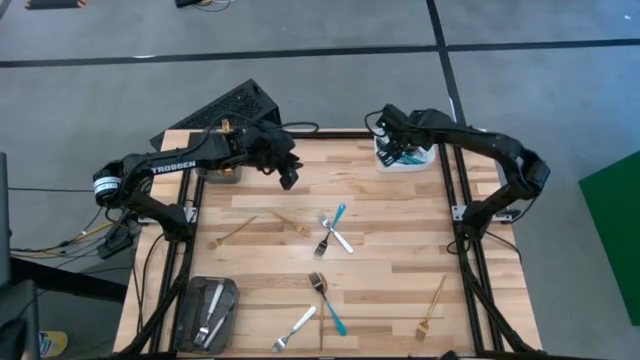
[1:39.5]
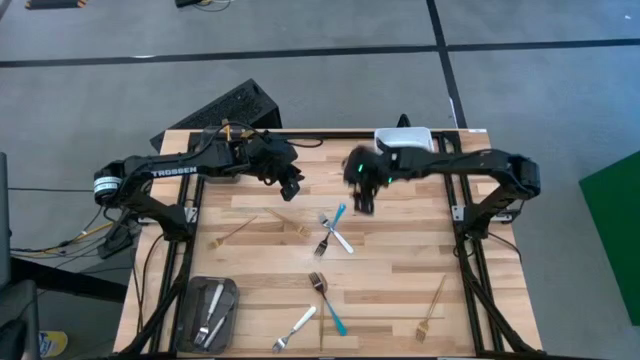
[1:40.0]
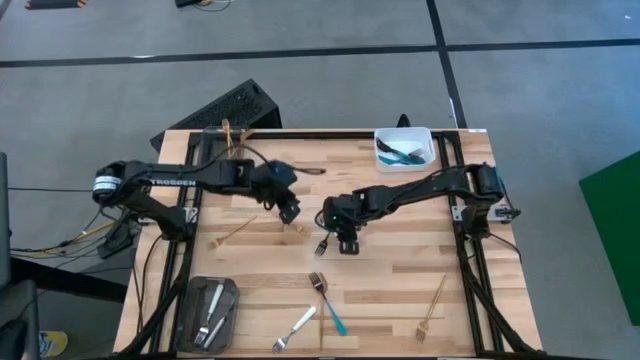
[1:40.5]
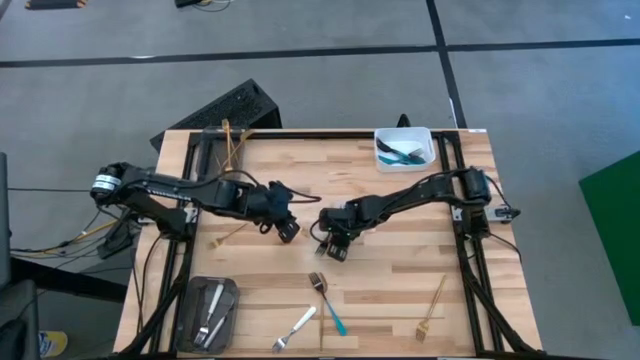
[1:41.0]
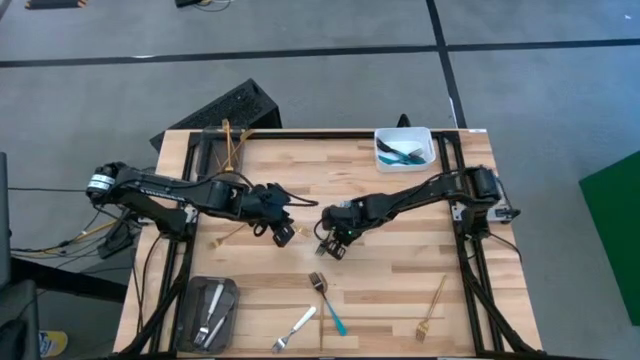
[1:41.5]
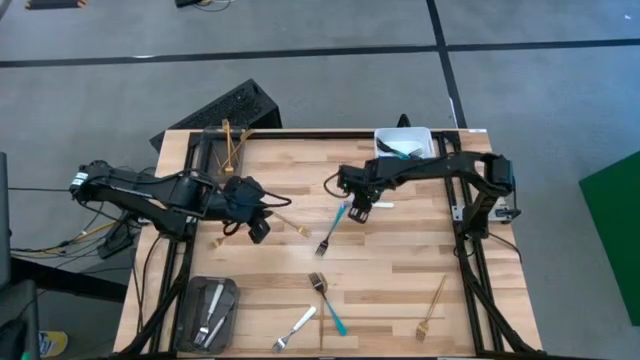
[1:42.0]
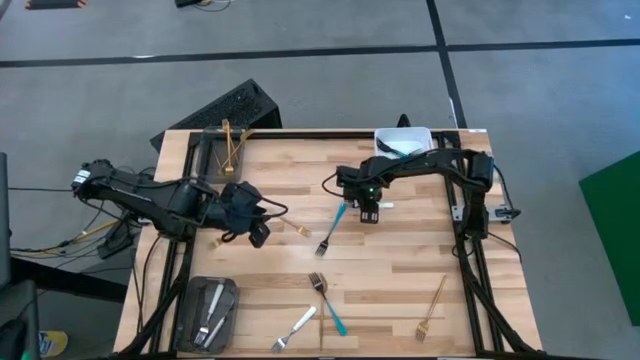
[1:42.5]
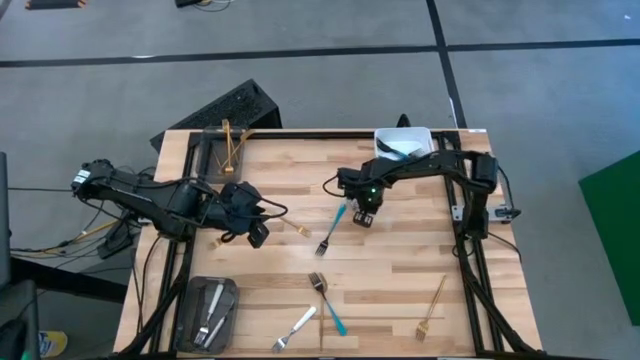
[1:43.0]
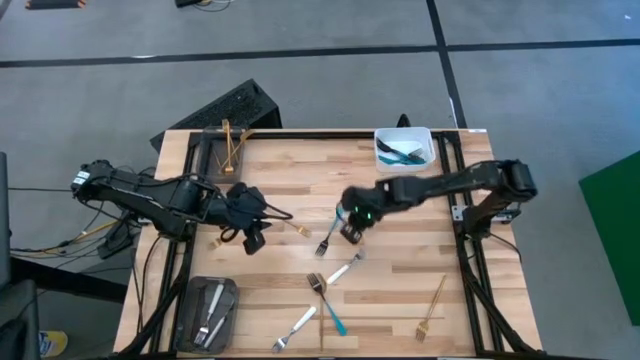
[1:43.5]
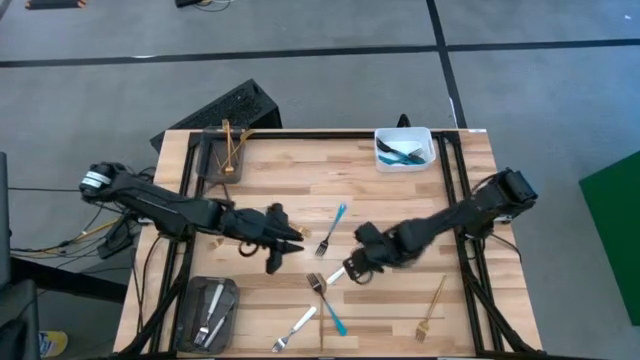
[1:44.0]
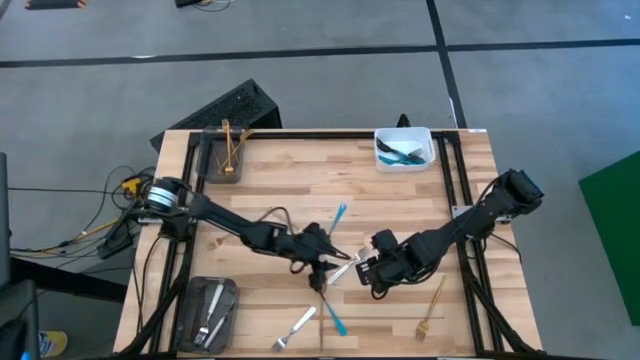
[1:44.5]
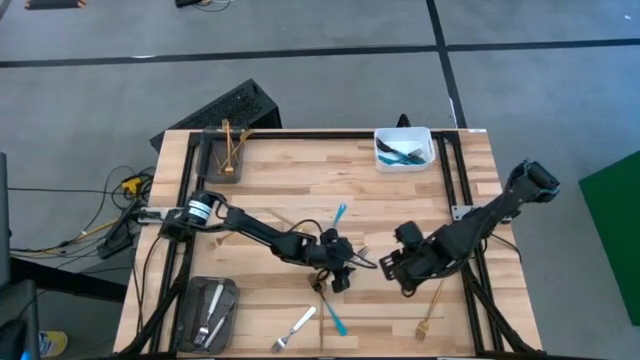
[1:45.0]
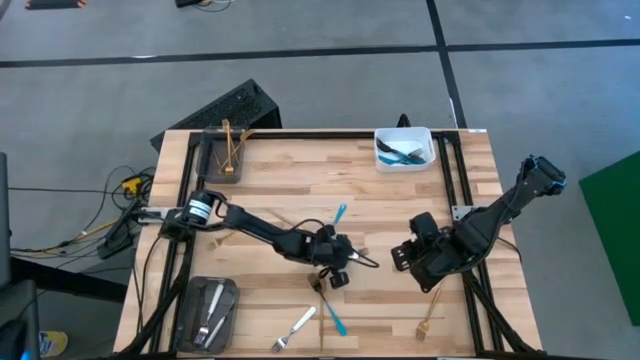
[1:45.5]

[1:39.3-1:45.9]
Task: Sort silverware by color (type)
Put the white fork into the bottom black bin

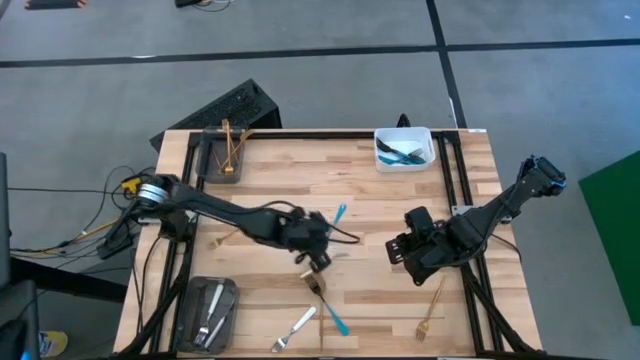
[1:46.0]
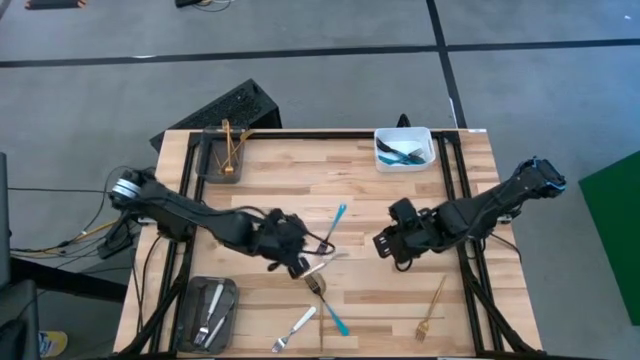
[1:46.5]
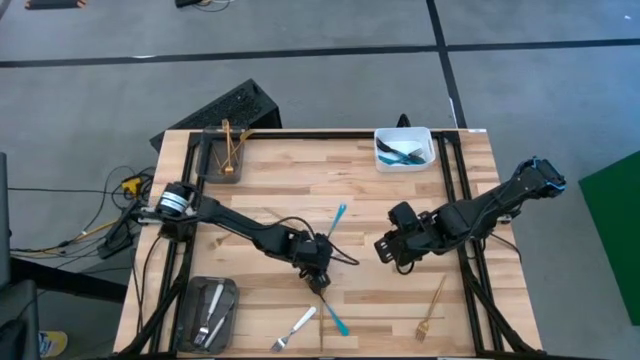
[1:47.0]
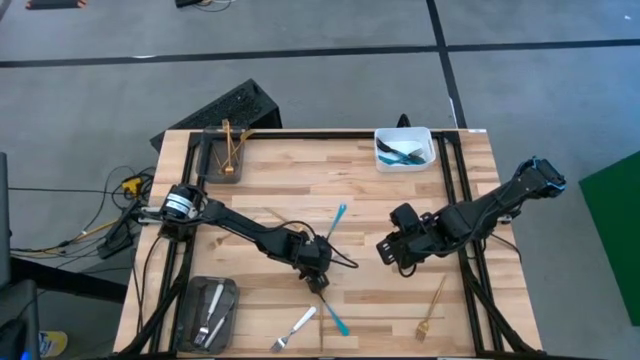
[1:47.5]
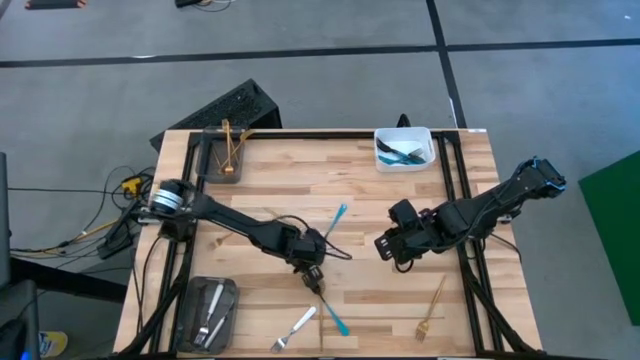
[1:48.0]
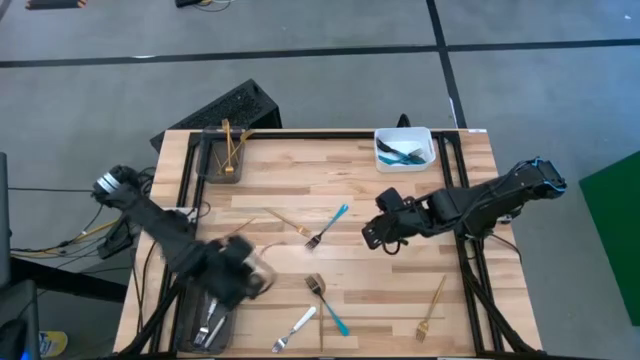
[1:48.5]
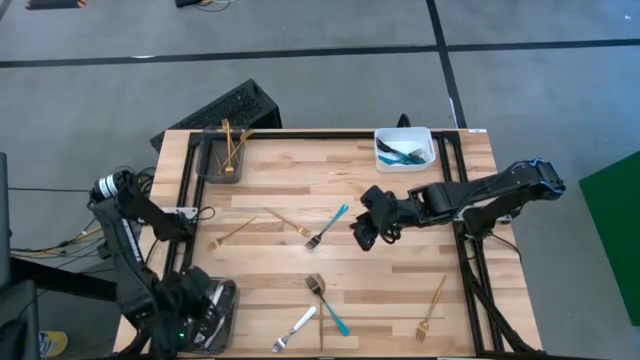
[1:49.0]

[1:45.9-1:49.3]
Put the white fork into the bottom black bin

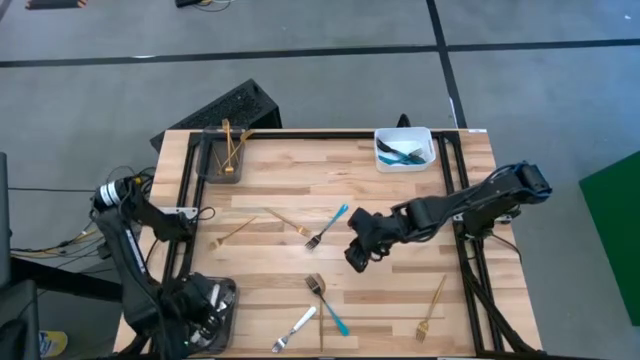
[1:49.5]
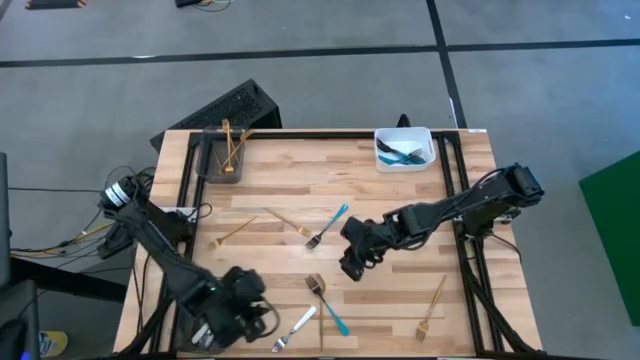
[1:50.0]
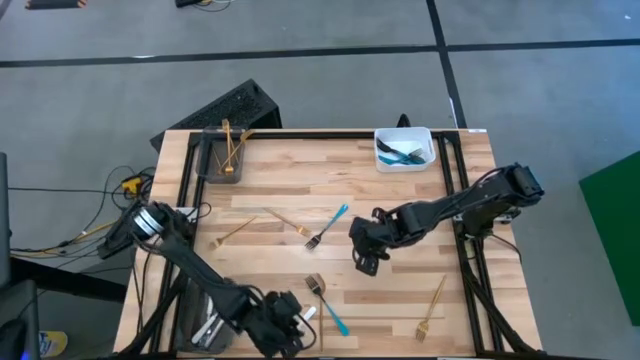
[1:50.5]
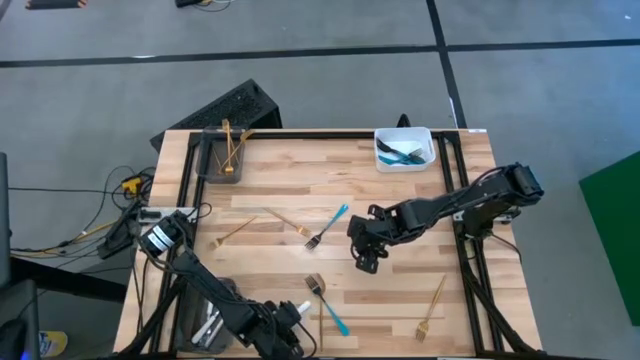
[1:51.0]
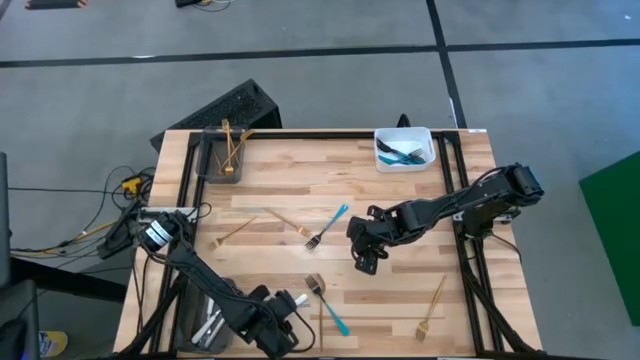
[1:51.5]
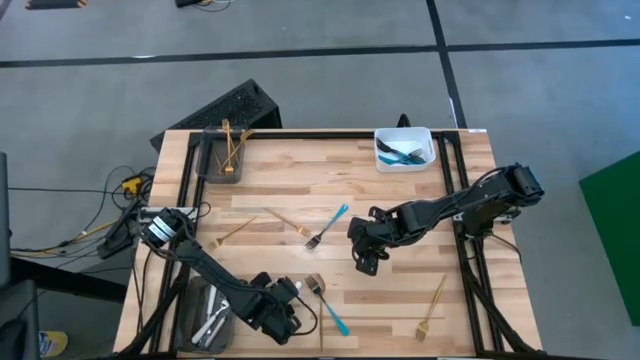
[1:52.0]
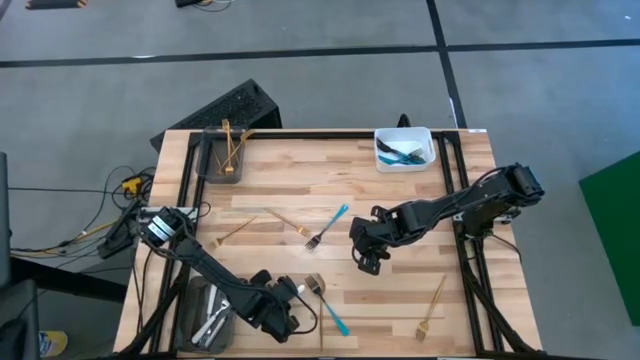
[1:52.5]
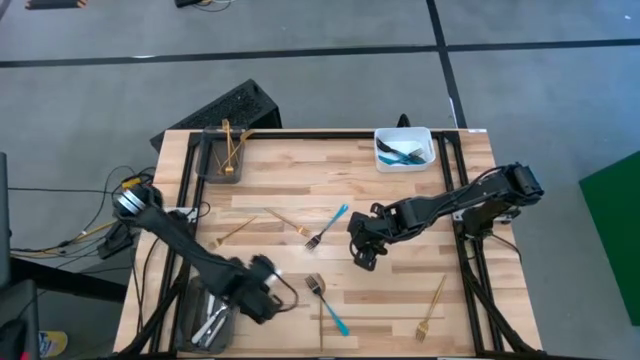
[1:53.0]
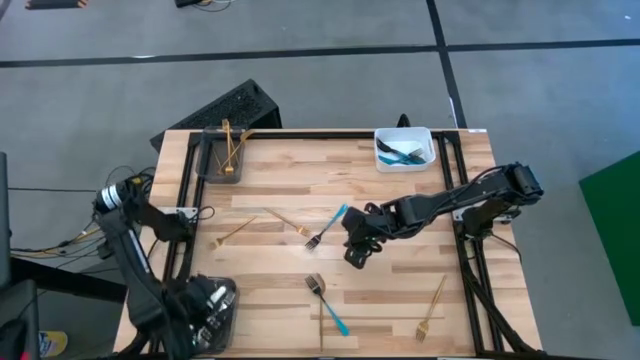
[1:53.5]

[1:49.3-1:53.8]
Put the white fork into the bottom black bin

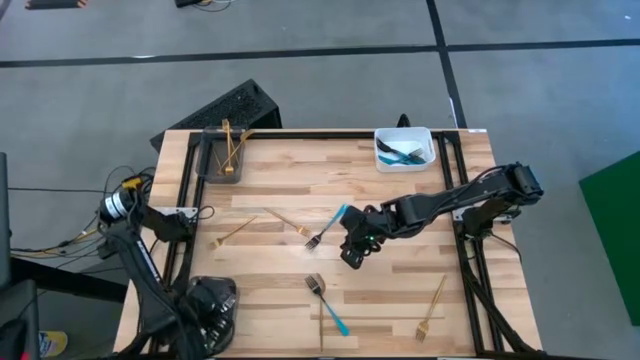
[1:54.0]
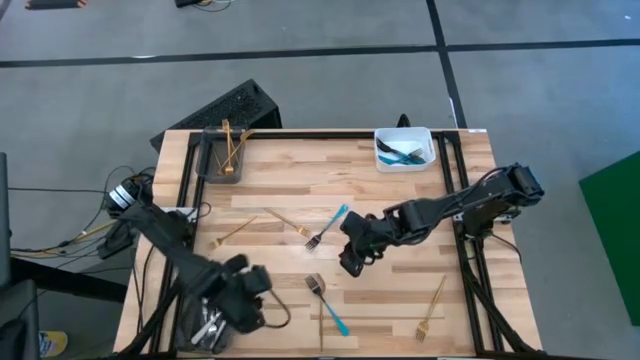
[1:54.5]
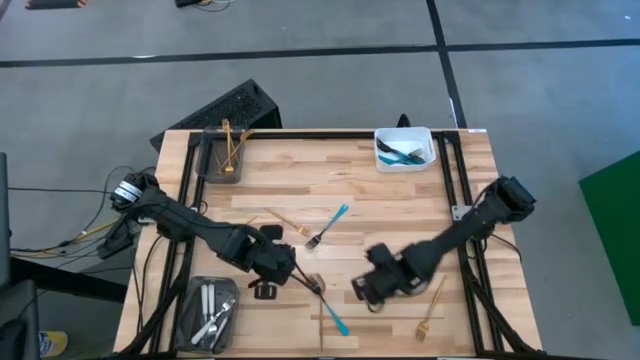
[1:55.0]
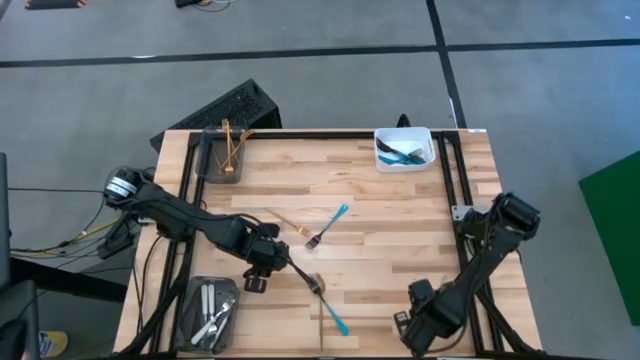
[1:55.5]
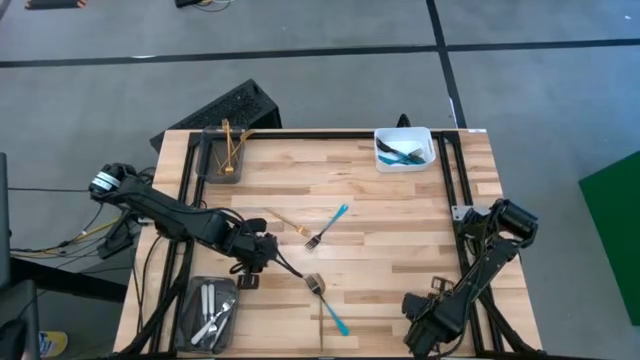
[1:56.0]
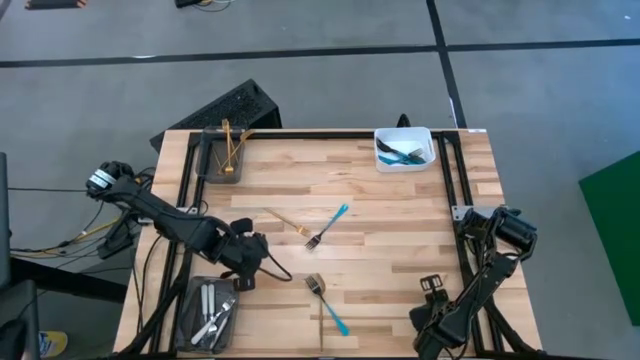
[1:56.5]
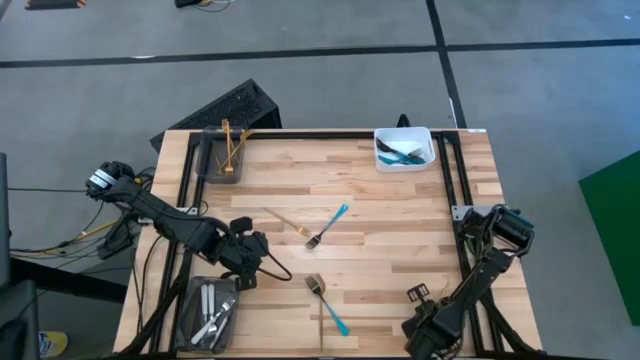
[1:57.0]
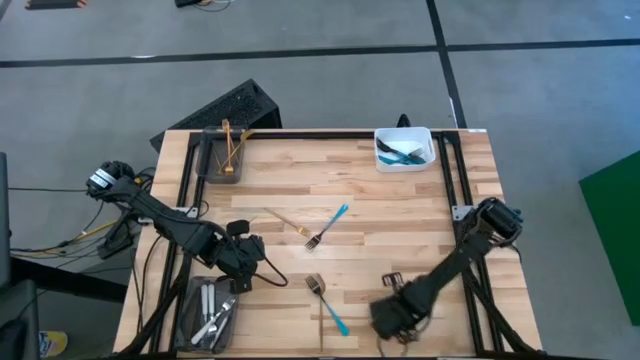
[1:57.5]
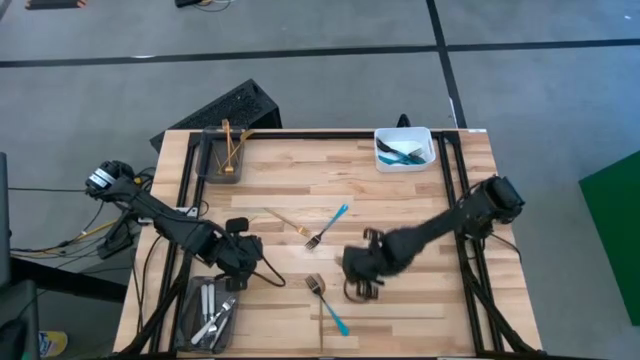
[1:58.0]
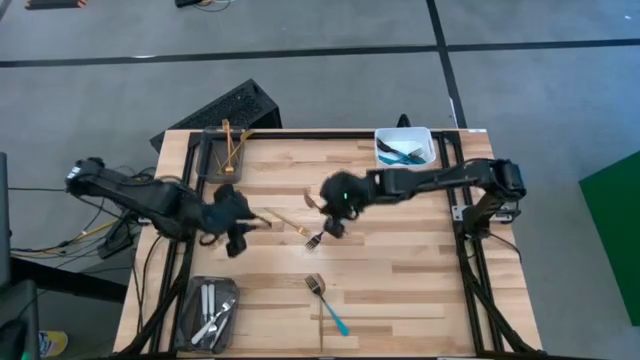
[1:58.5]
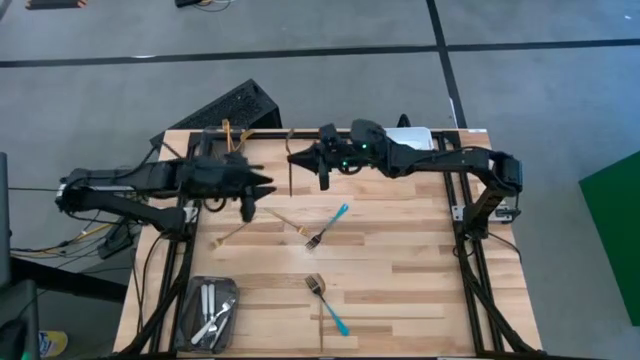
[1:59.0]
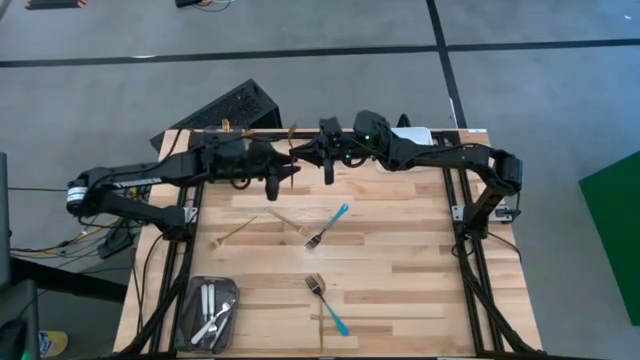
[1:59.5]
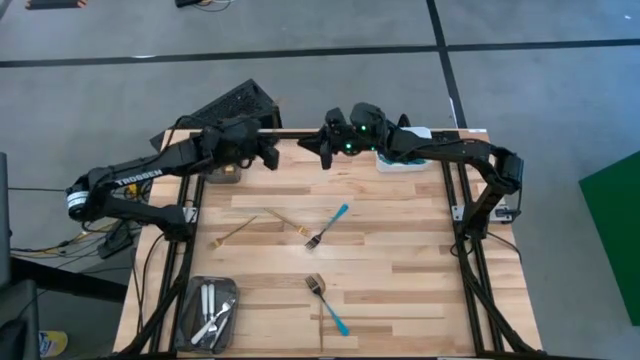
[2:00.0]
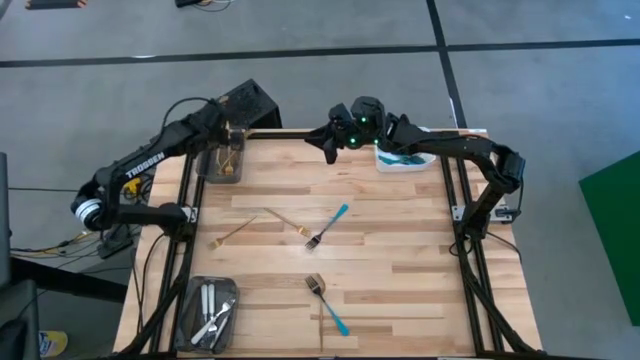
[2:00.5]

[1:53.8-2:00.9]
Put the gold fork into the top black bin
